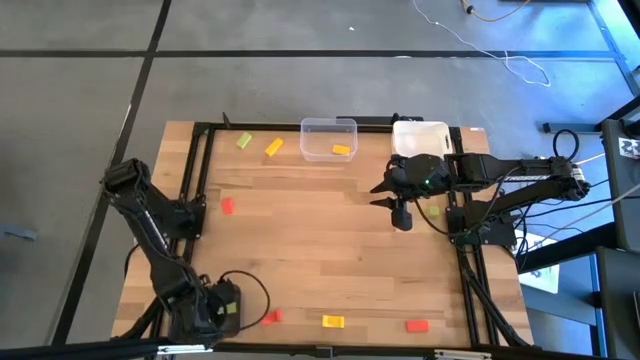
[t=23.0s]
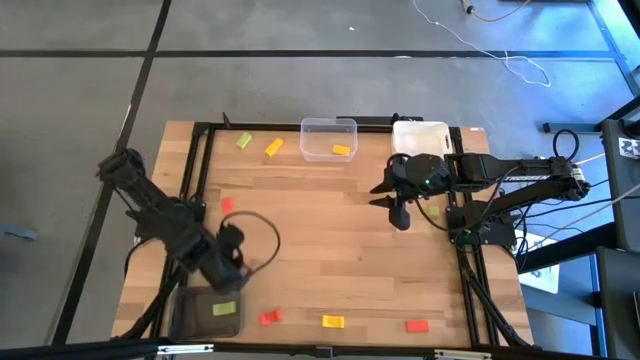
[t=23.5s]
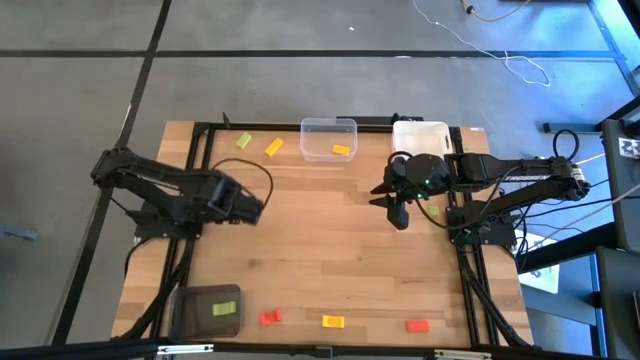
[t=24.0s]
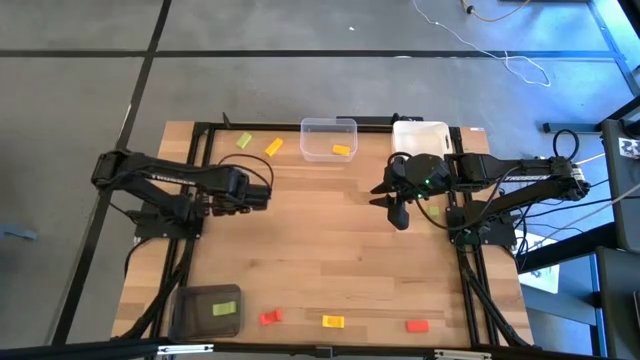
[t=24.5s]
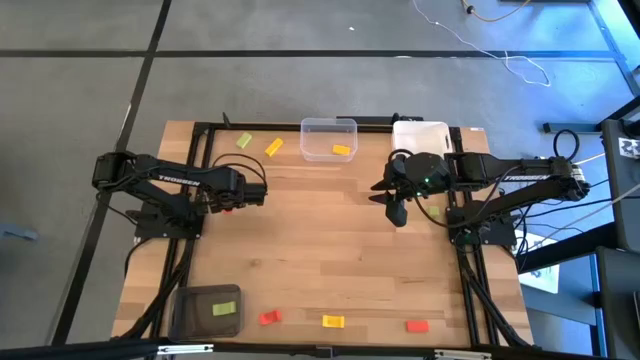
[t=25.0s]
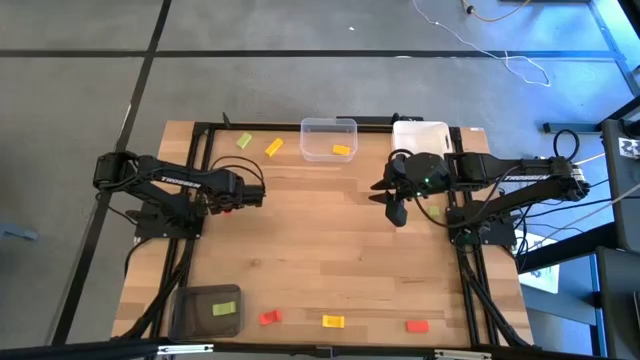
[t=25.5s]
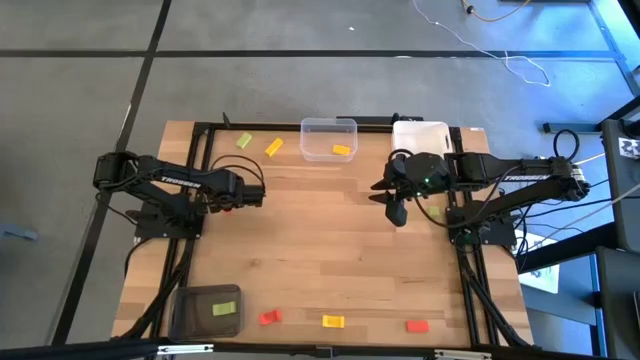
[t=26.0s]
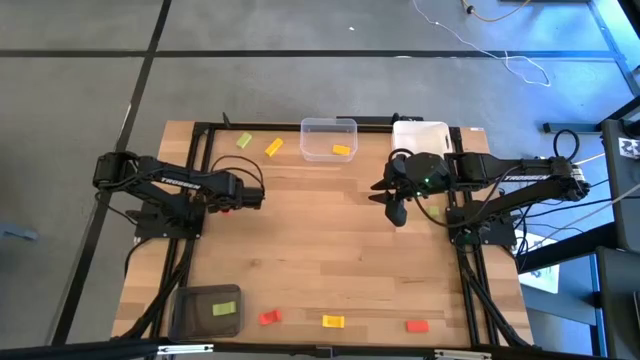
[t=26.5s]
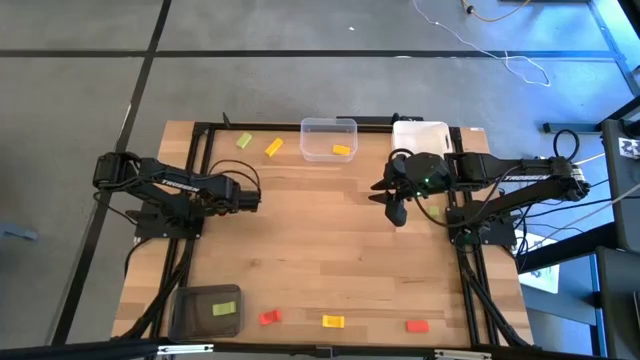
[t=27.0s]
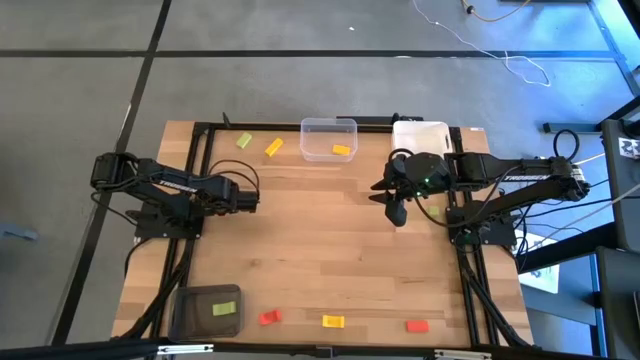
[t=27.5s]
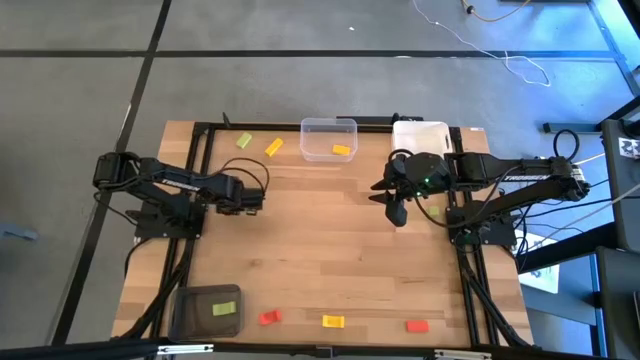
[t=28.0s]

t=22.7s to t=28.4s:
Task: Sort & place blocks by color
Put the top left orange block into the white bin

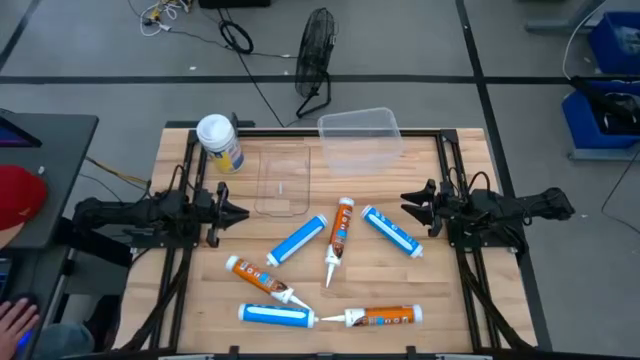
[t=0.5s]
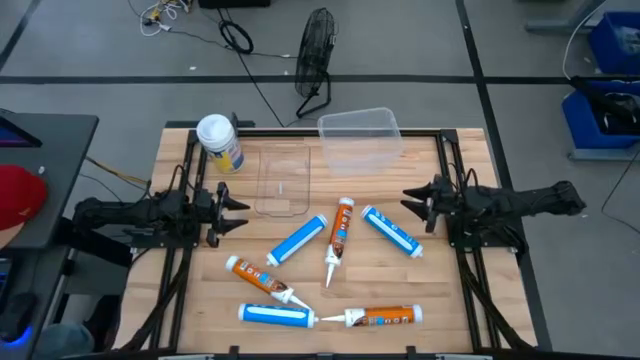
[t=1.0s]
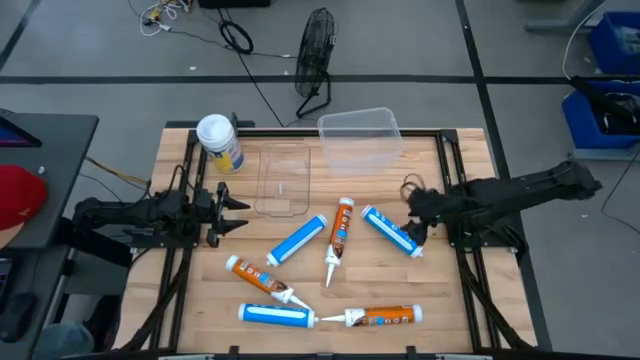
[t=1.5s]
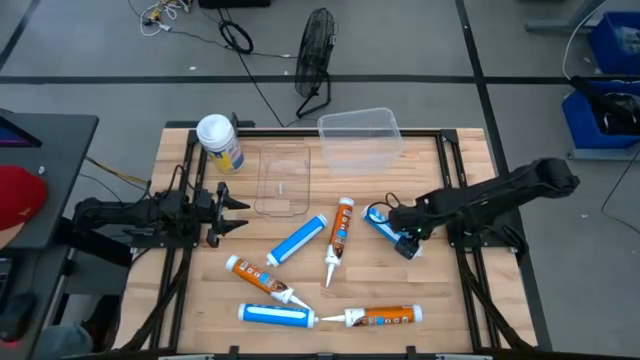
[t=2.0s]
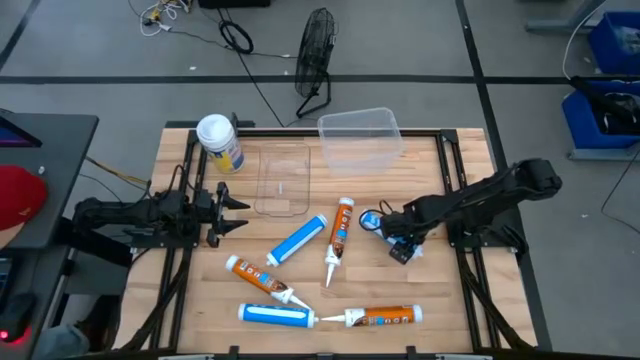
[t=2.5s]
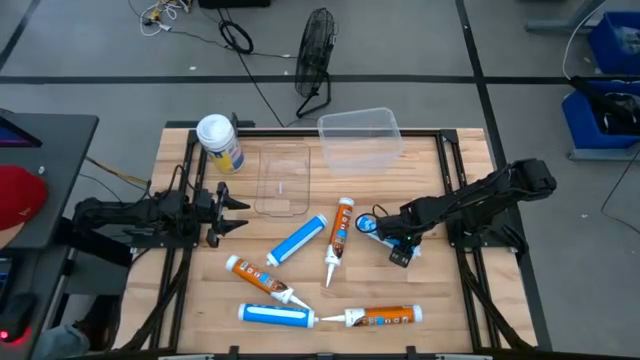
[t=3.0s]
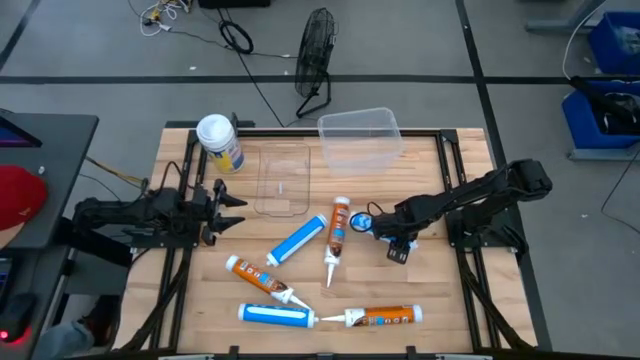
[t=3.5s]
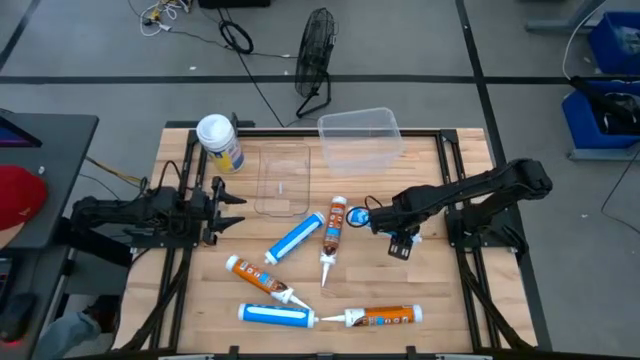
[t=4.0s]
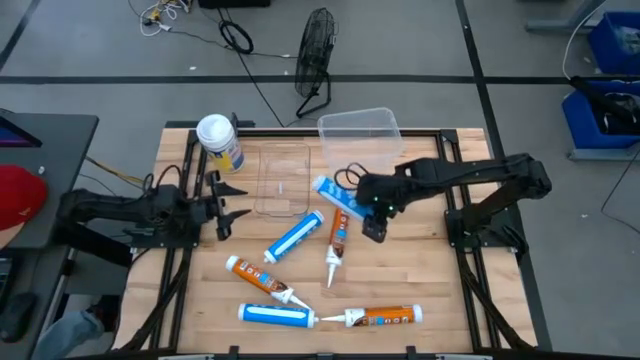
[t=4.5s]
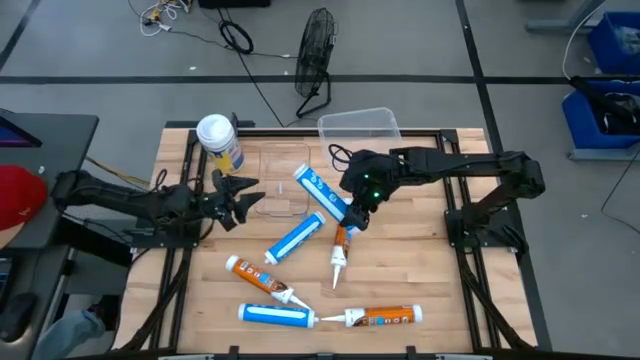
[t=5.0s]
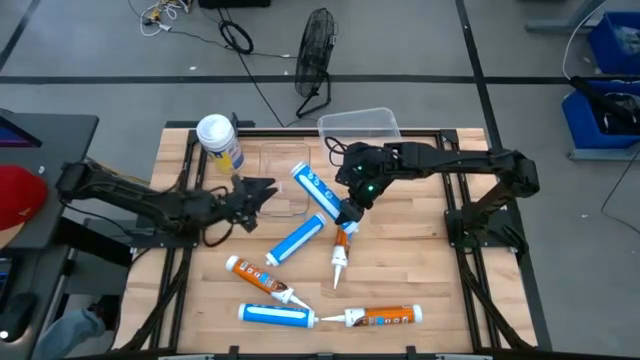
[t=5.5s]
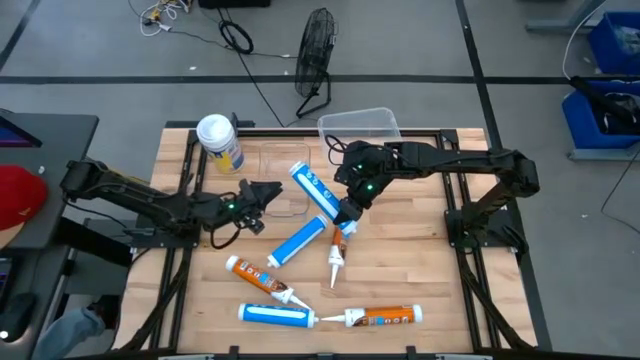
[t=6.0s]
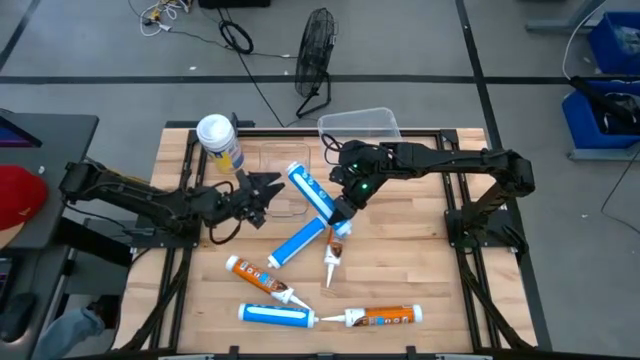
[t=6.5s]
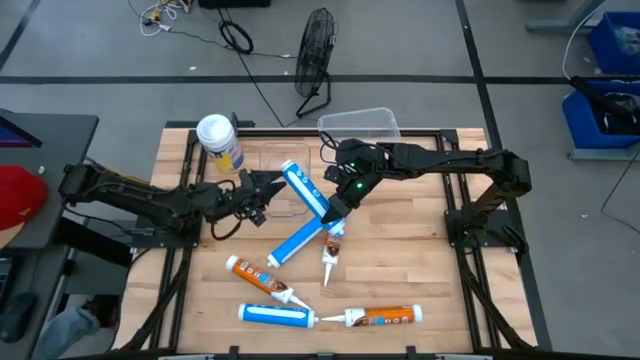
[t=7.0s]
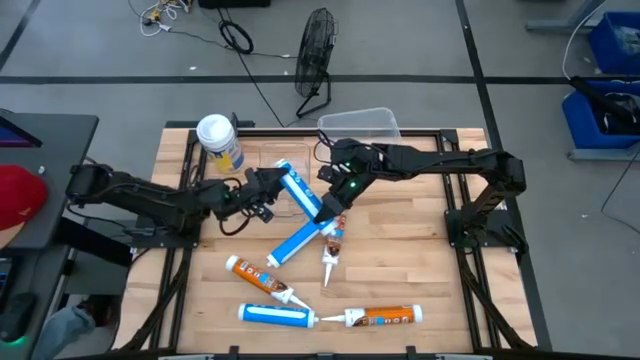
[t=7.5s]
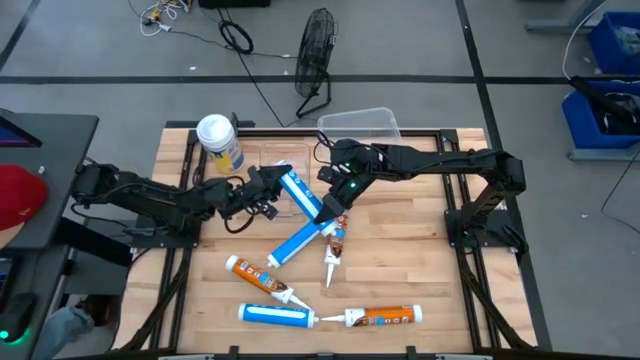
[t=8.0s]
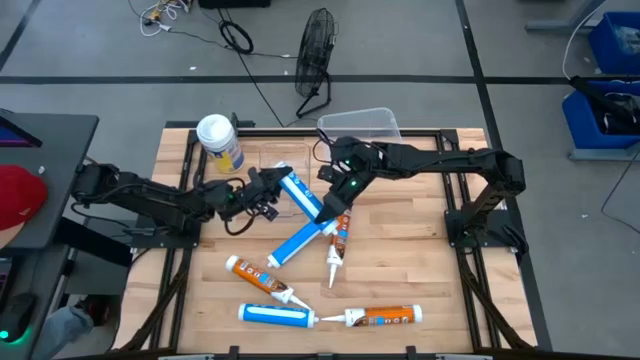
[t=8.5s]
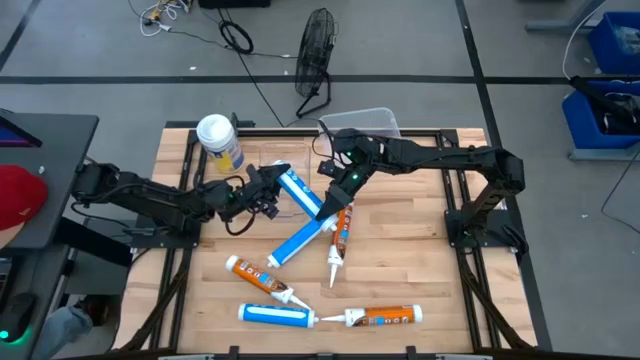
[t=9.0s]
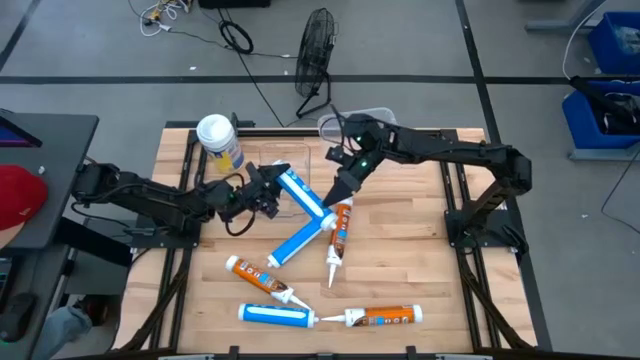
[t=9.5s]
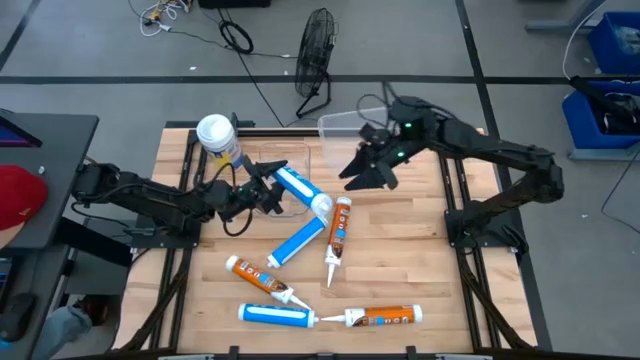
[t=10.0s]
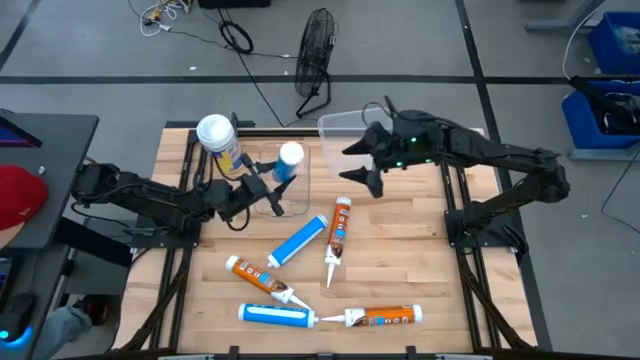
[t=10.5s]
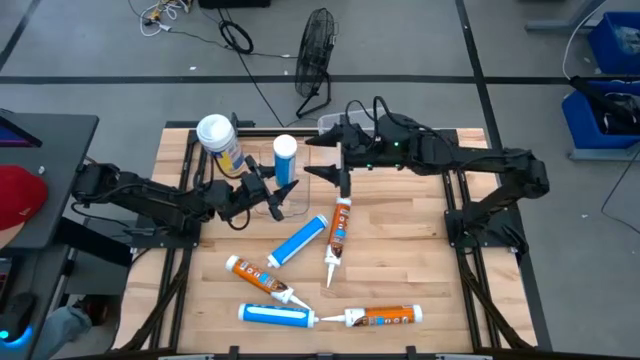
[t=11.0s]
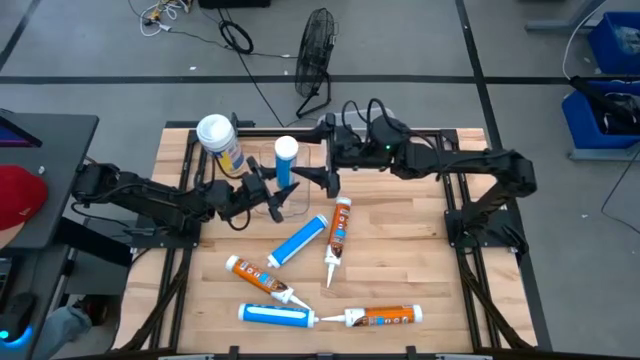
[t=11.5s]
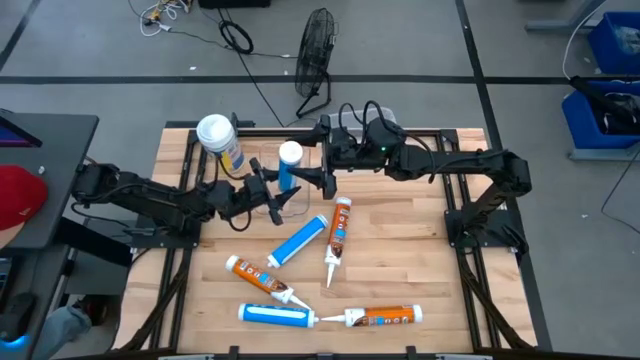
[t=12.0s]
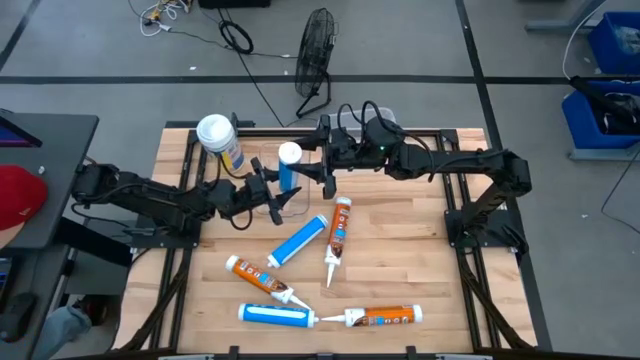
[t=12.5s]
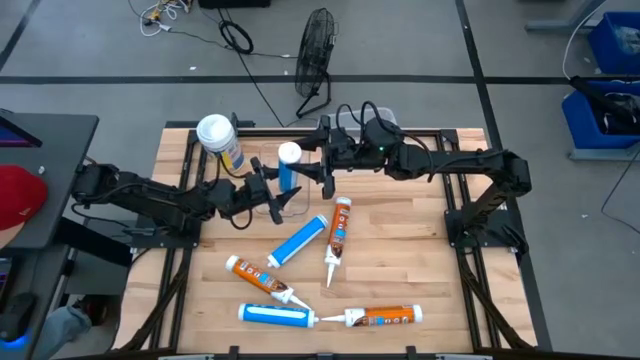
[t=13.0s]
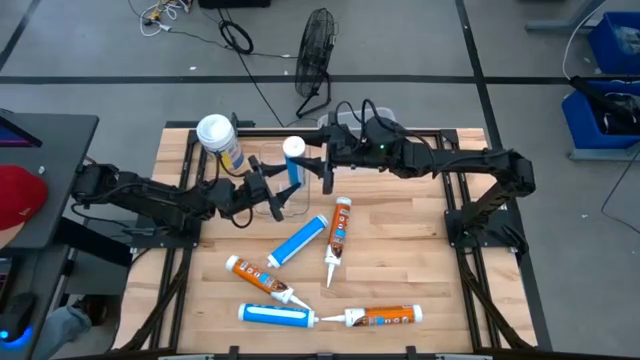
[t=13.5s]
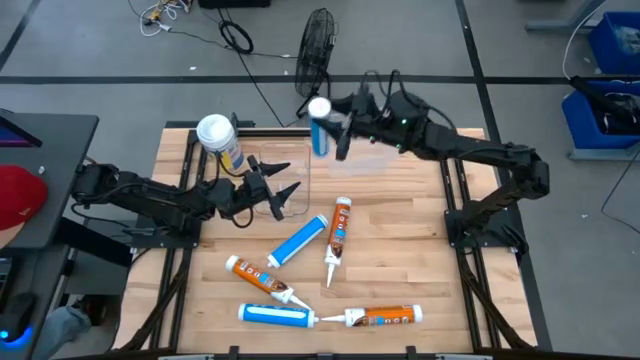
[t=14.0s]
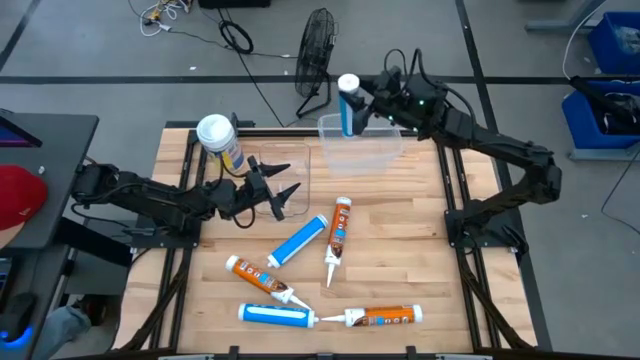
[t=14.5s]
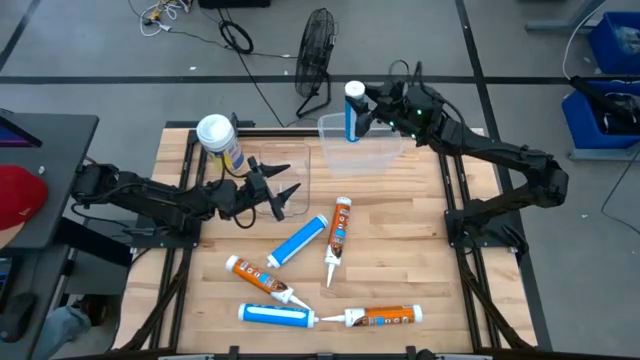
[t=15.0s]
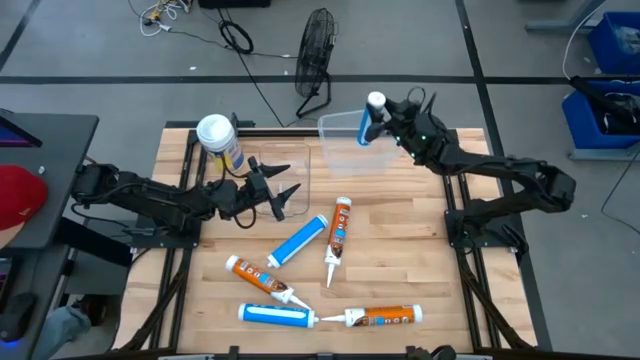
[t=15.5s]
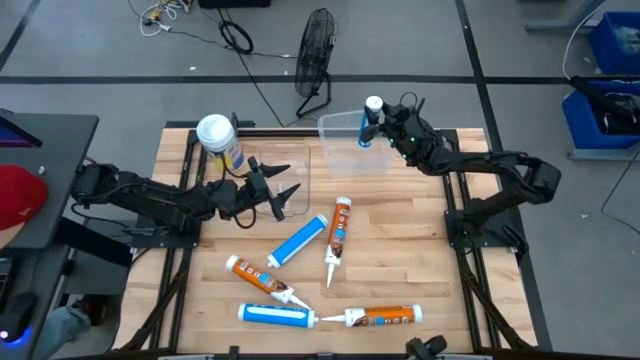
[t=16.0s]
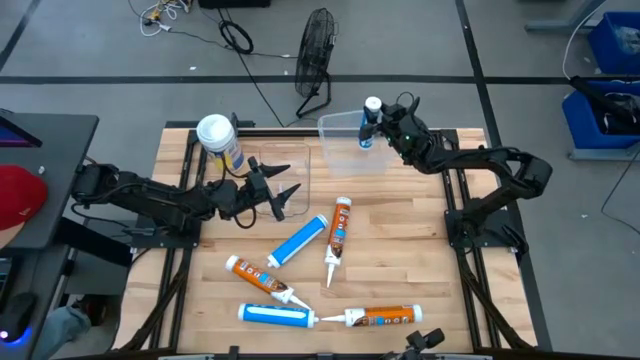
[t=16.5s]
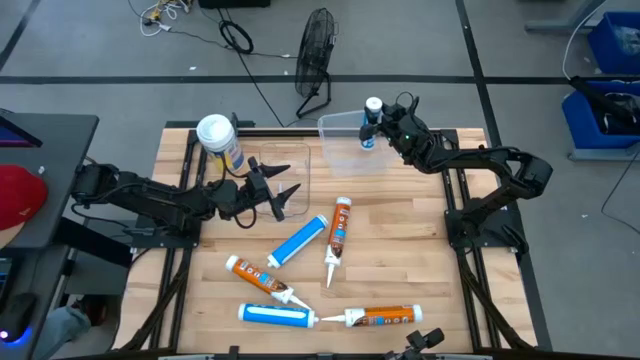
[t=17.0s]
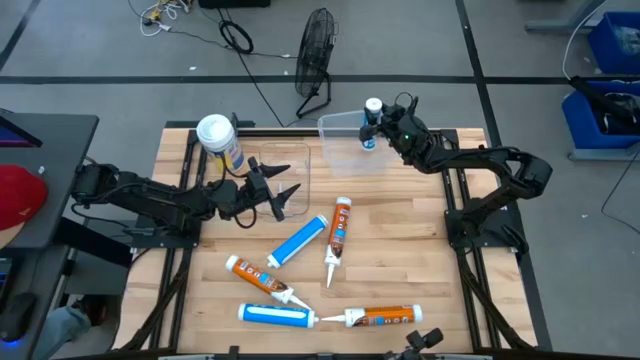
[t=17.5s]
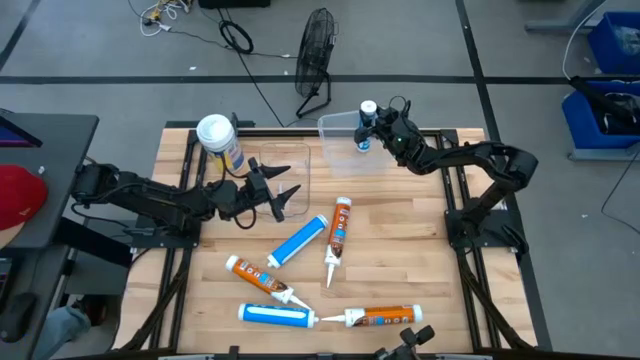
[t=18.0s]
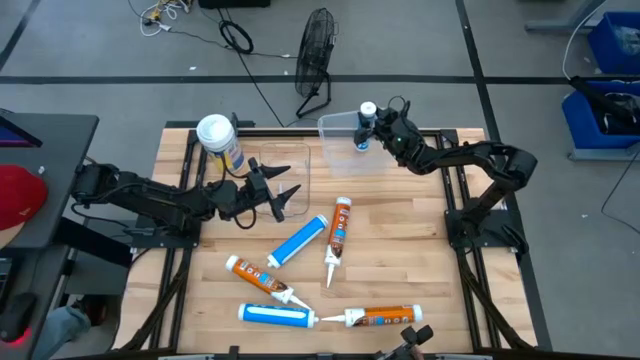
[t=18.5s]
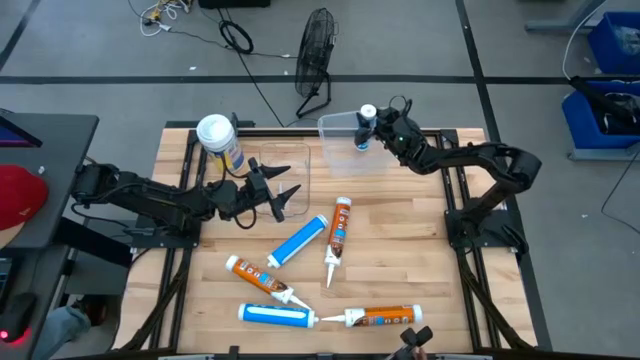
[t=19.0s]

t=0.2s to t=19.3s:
Task: Pick & place silicon tubes, Sealant and Lysol wipes
Put the right blue sealant into the white bin
